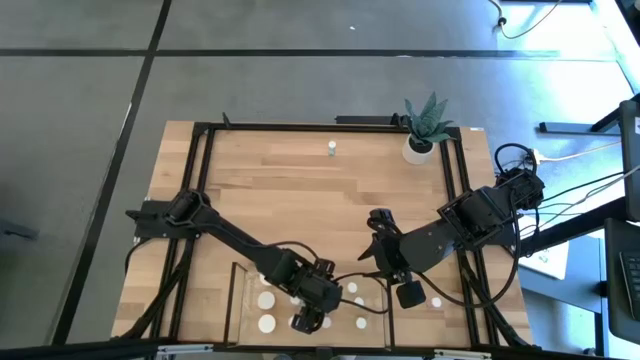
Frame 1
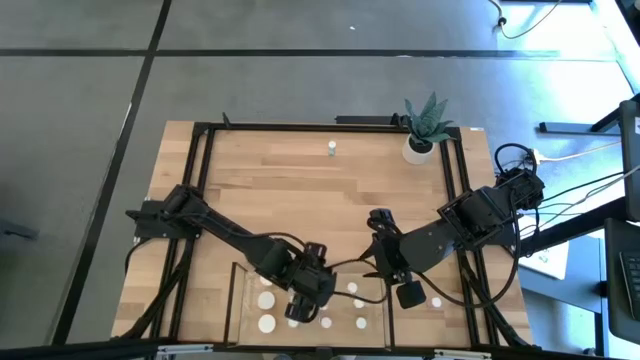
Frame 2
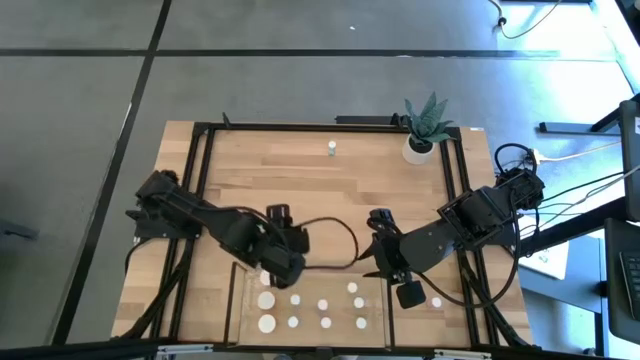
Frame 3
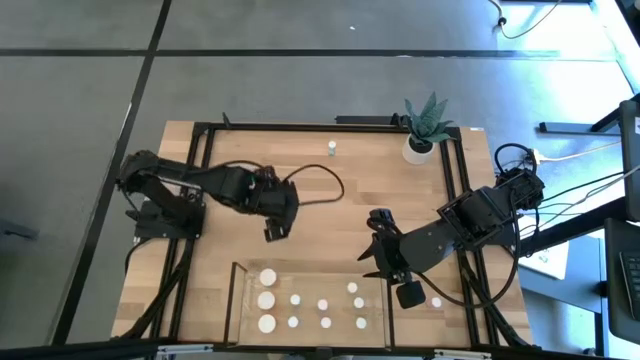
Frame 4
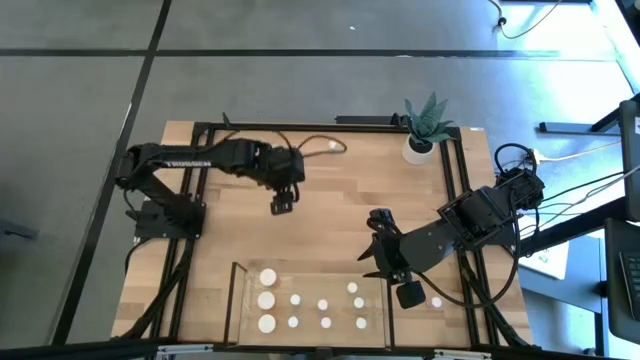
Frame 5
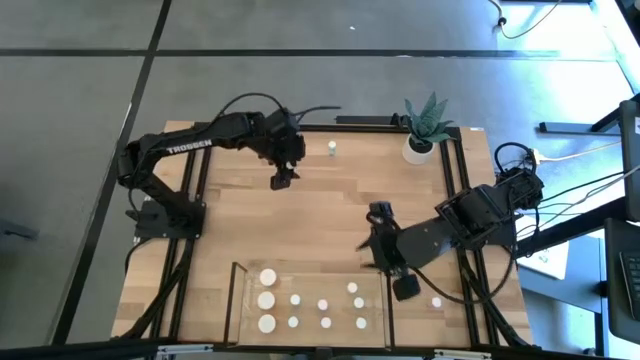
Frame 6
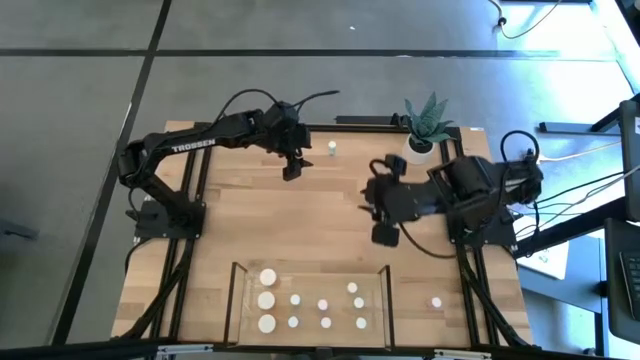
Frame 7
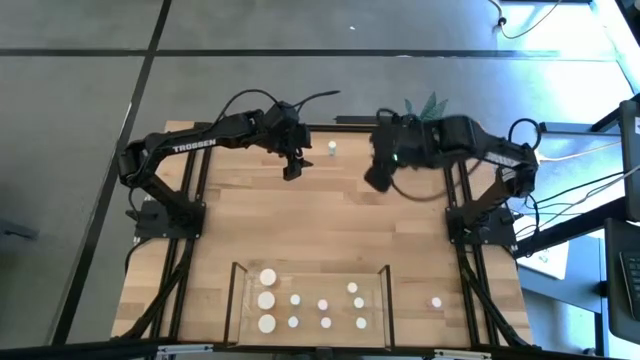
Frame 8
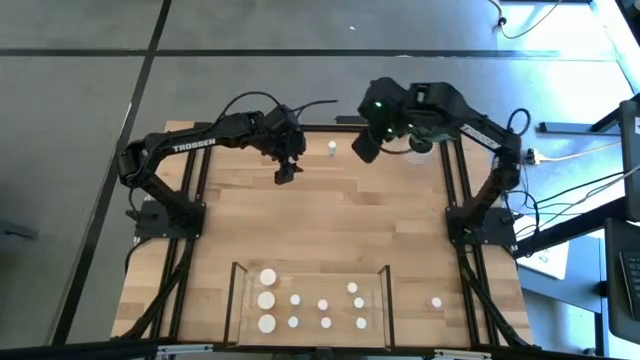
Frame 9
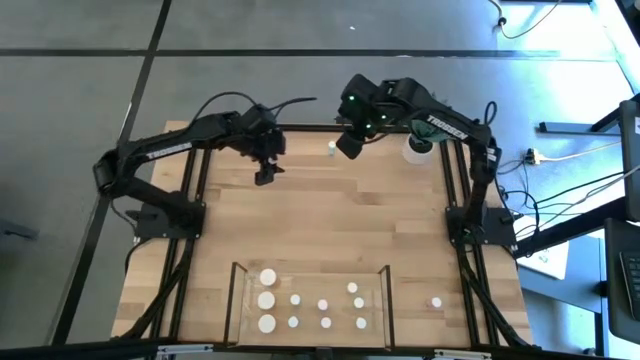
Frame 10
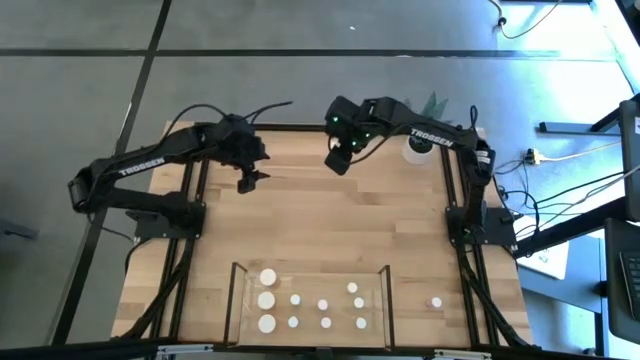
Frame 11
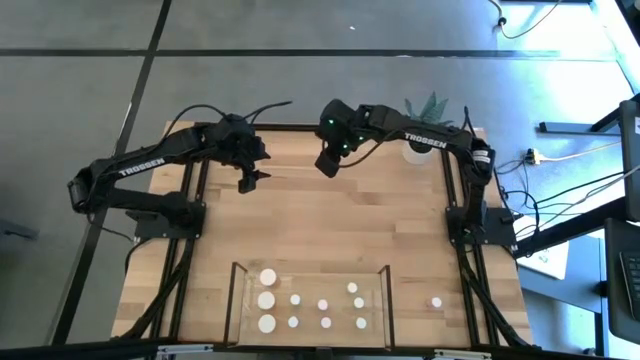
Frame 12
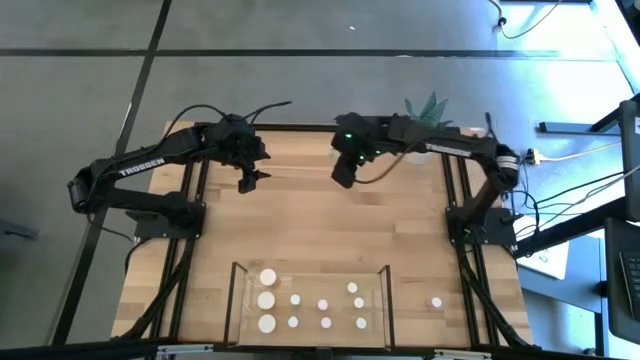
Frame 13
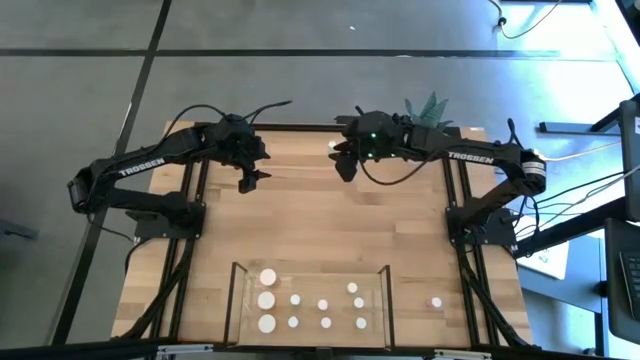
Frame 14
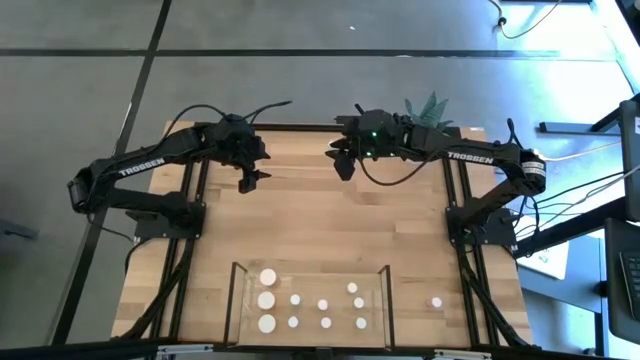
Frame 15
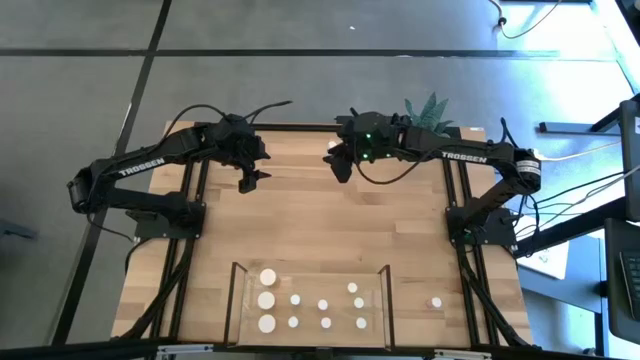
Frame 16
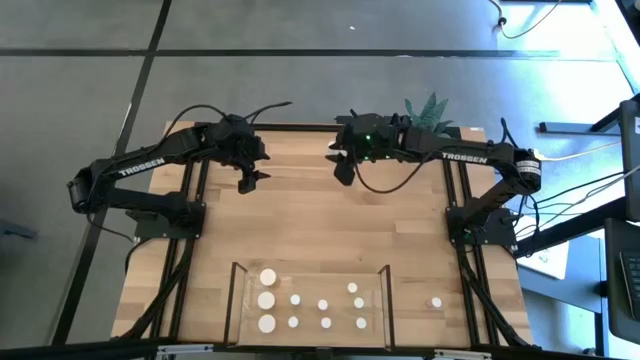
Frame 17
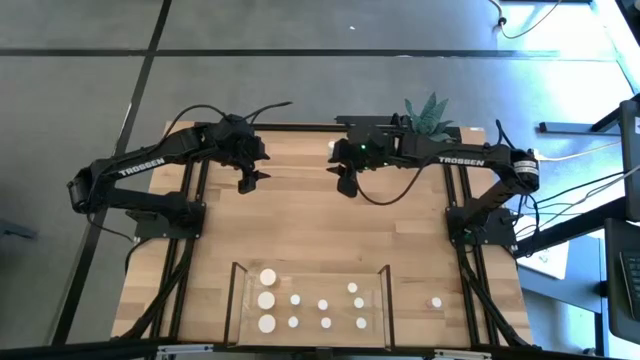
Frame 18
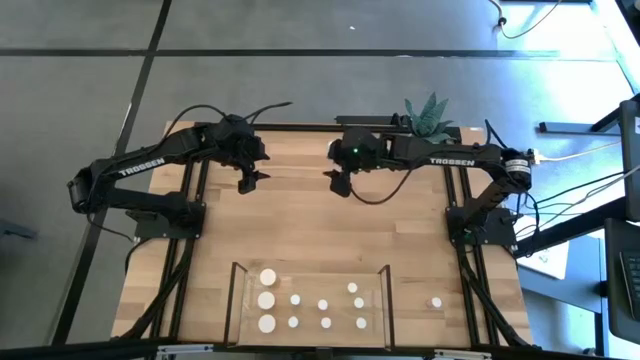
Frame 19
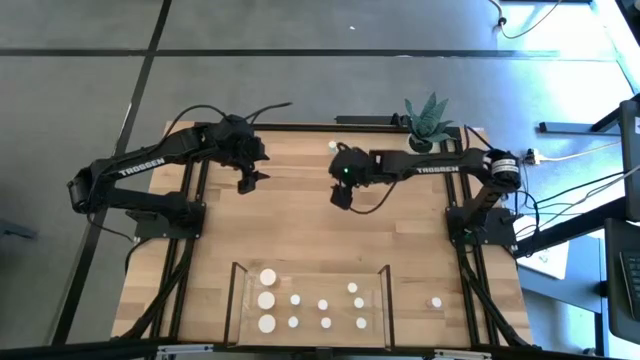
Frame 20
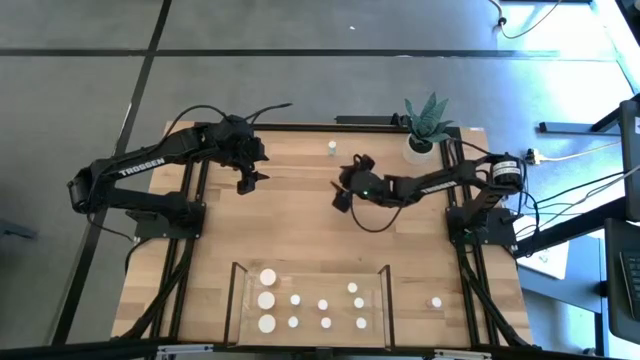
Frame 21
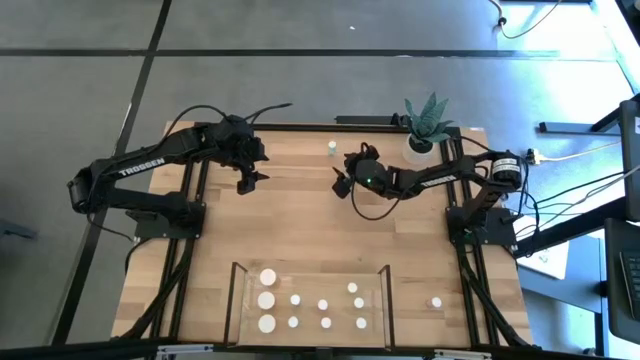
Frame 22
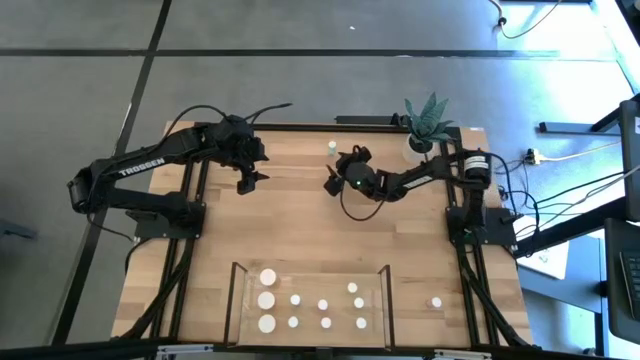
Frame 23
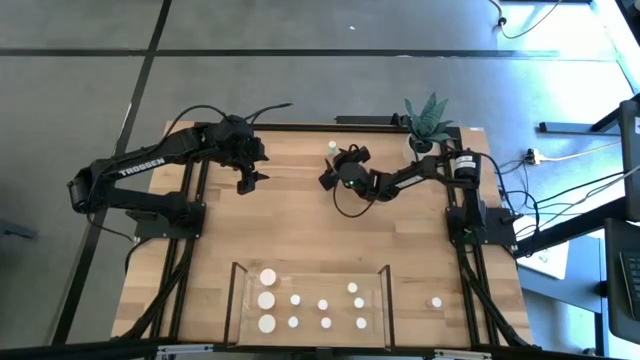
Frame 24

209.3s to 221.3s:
Task: Pick and place medicine bottles onto shelf by color
Put the blue pill bottle on the shelf aligned with the other blue pill bottles

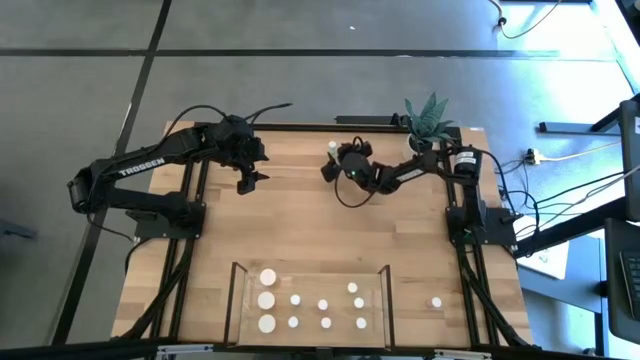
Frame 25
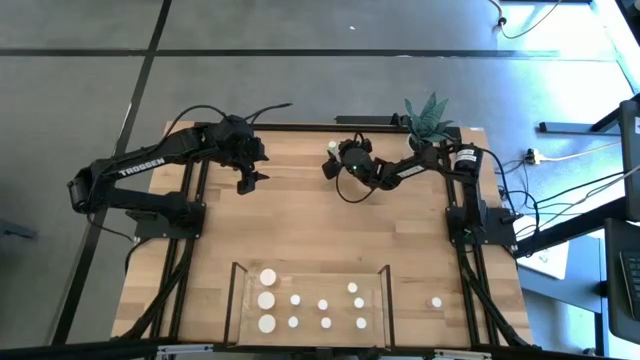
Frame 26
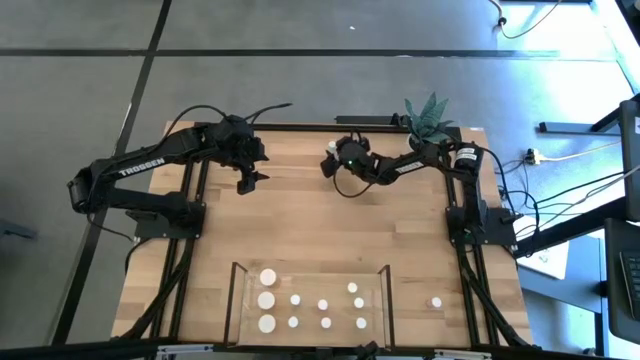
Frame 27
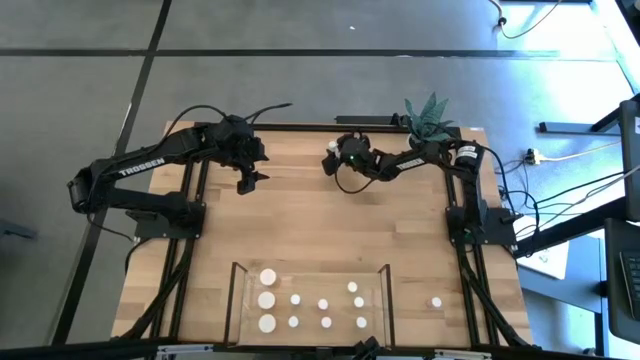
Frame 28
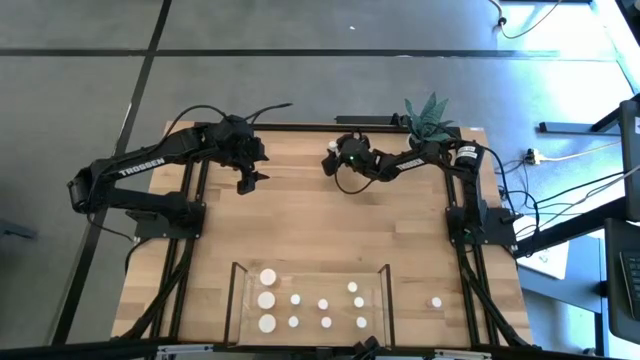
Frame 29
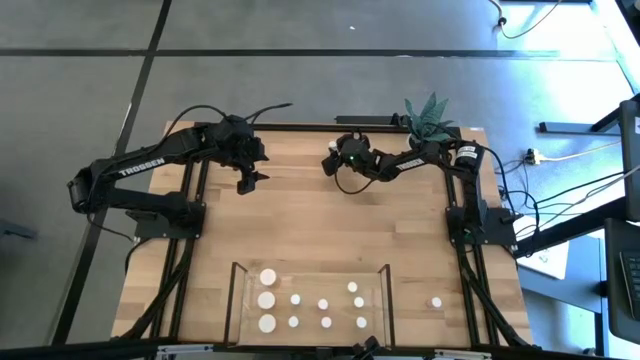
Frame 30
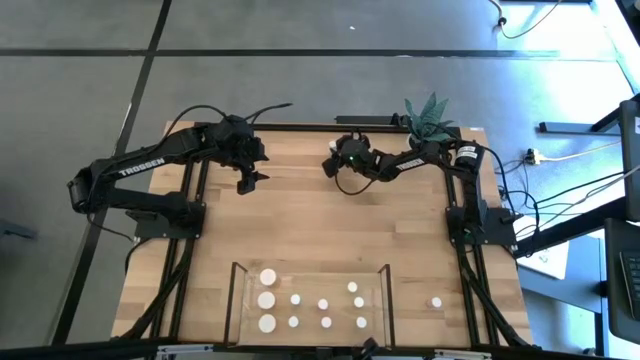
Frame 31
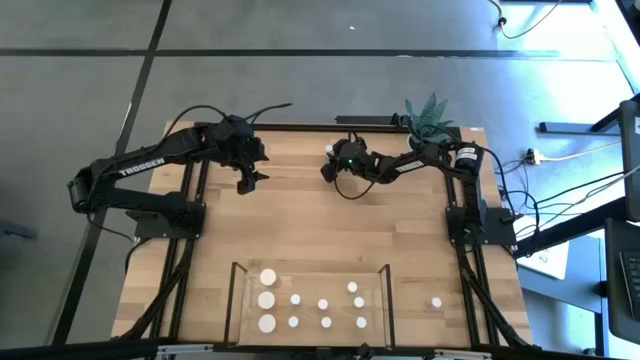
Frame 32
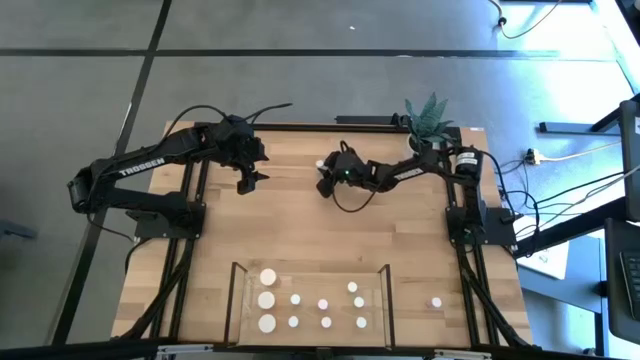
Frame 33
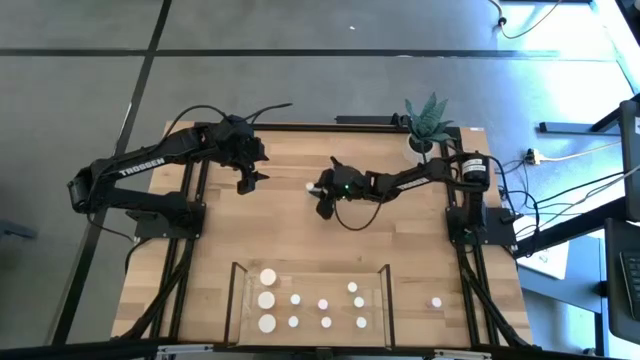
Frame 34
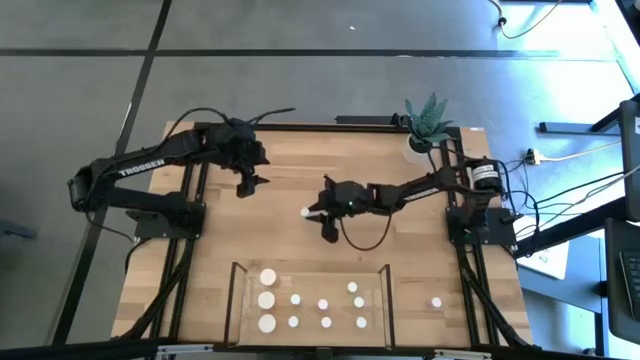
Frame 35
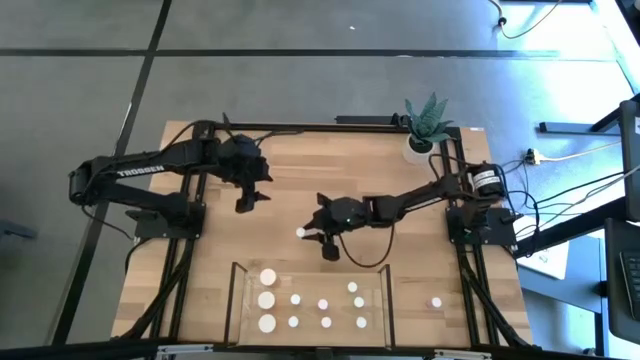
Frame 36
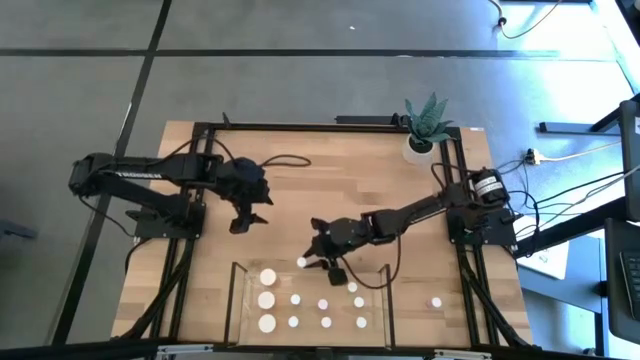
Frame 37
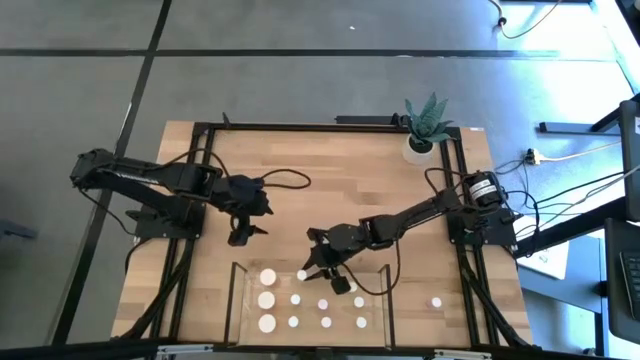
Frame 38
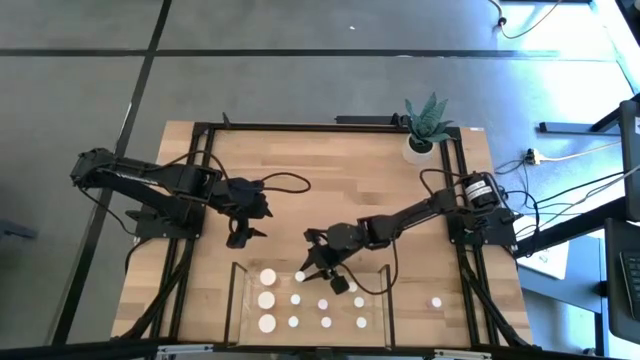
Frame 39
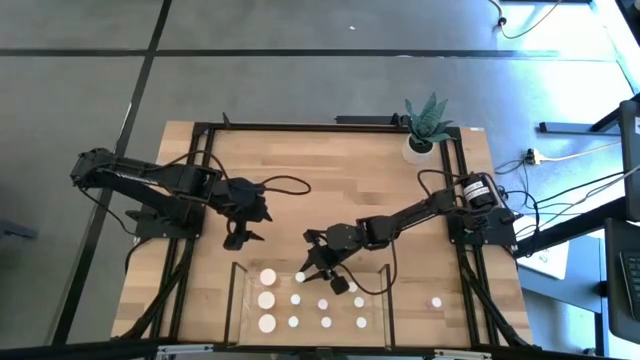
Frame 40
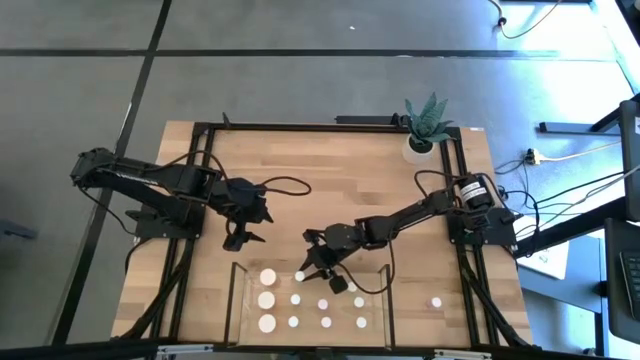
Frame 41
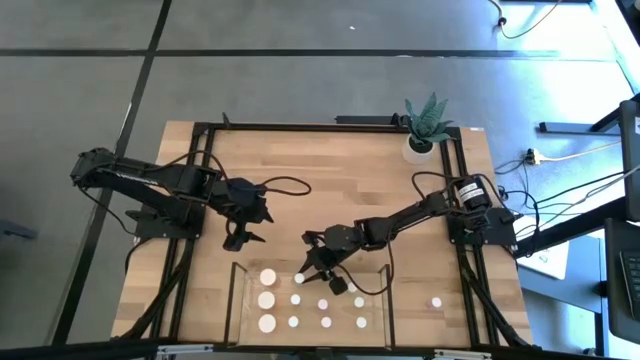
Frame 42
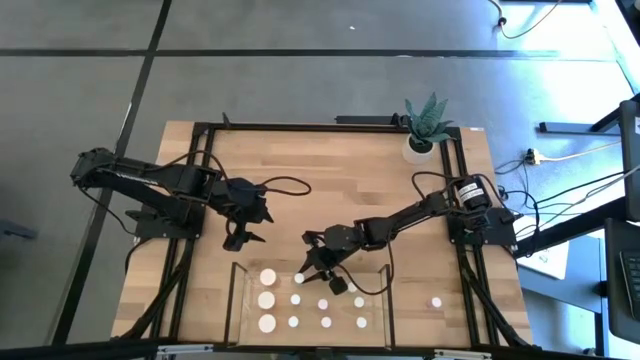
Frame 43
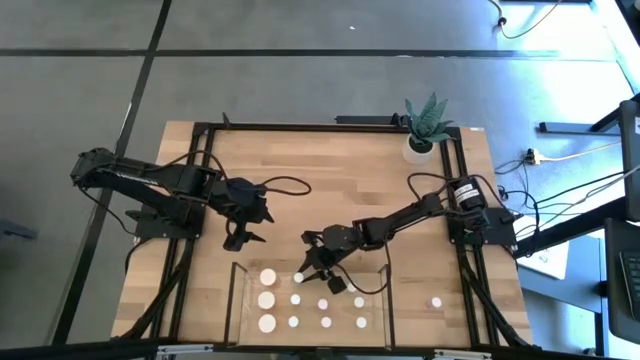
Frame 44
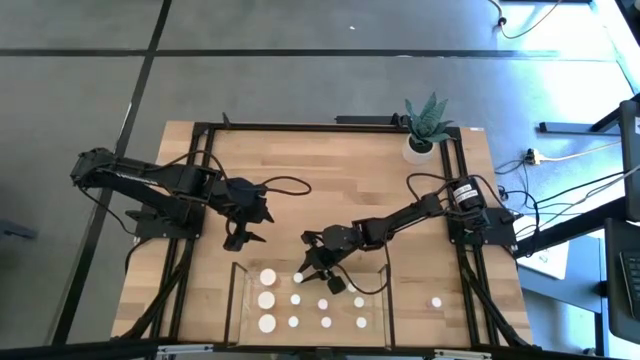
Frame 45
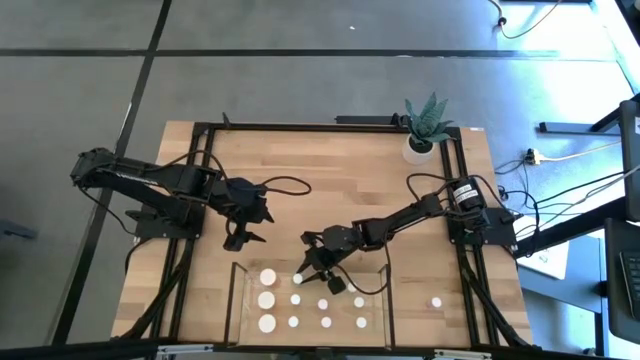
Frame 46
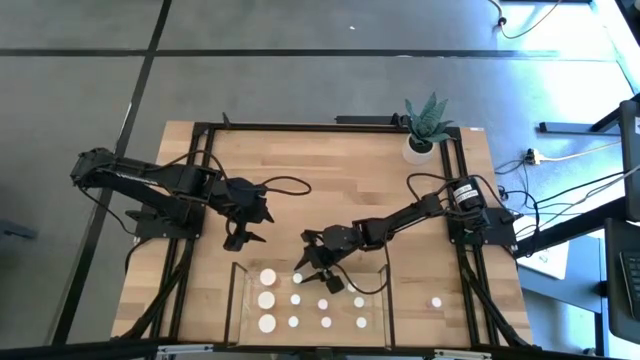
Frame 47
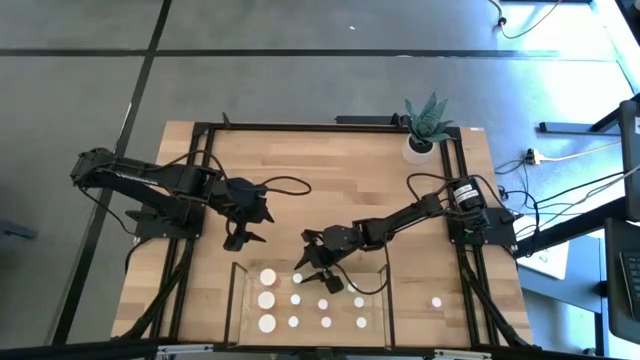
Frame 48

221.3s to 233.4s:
Put the blue pill bottle on the shelf aligned with the other blue pill bottles
